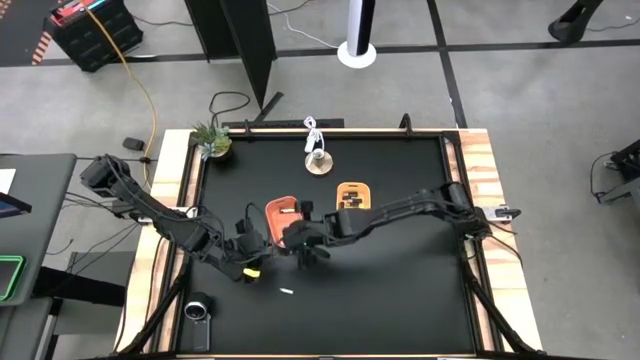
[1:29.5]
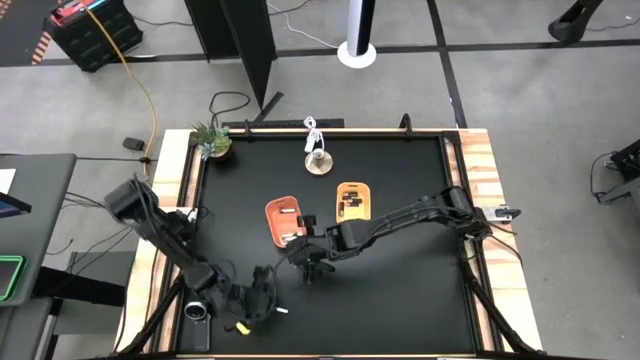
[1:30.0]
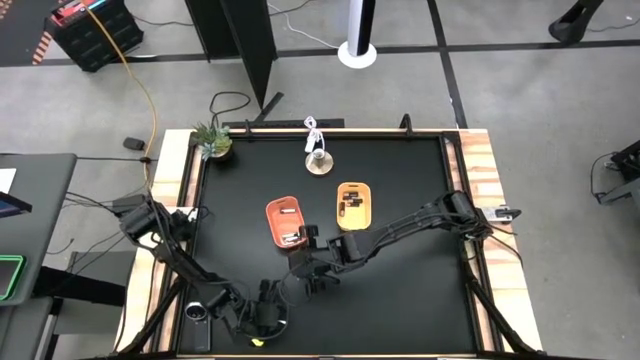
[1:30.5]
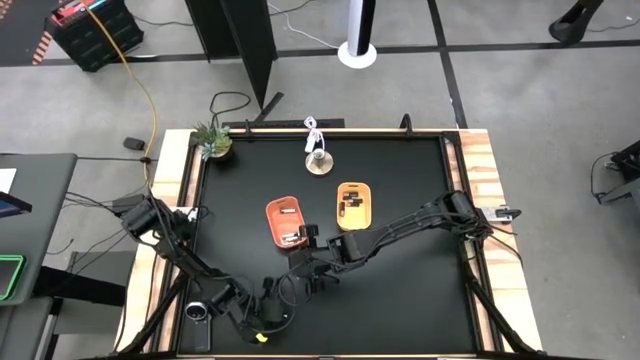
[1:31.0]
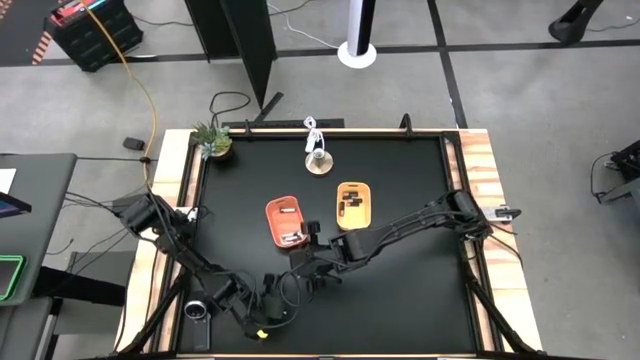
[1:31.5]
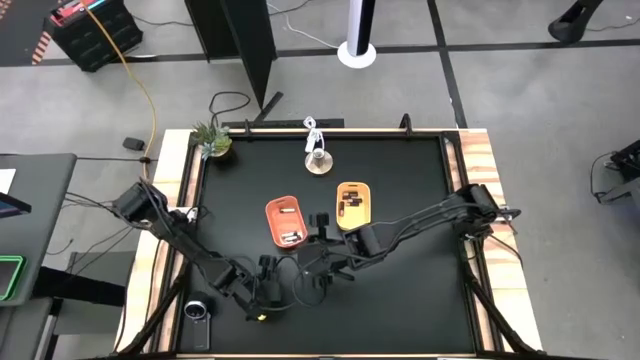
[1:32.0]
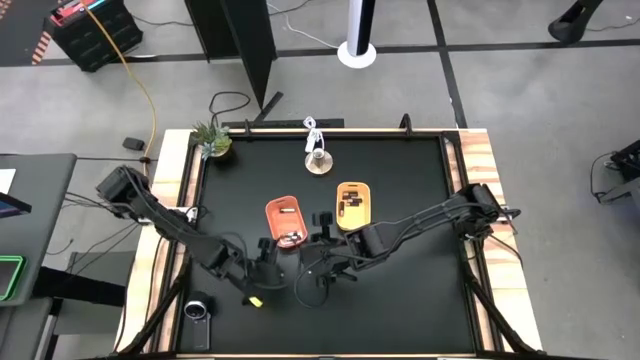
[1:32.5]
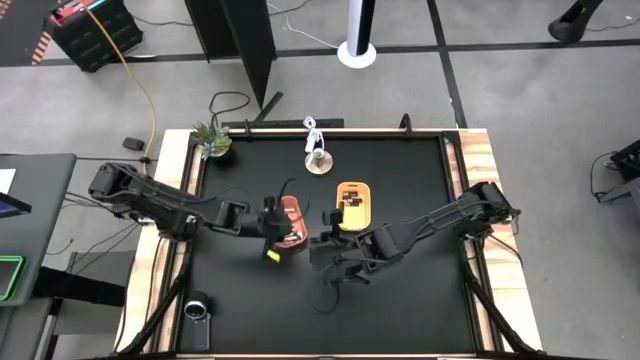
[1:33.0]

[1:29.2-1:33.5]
Task: Sort batteries
Put the silver battery into the orange bin

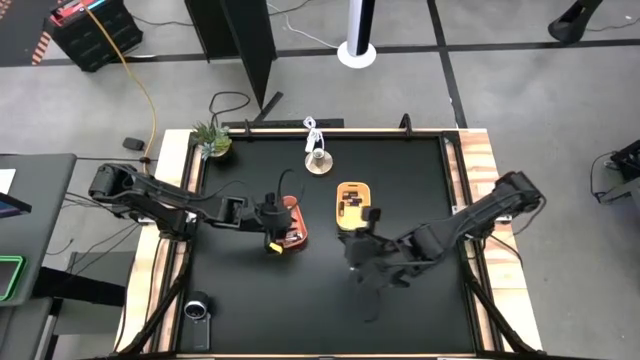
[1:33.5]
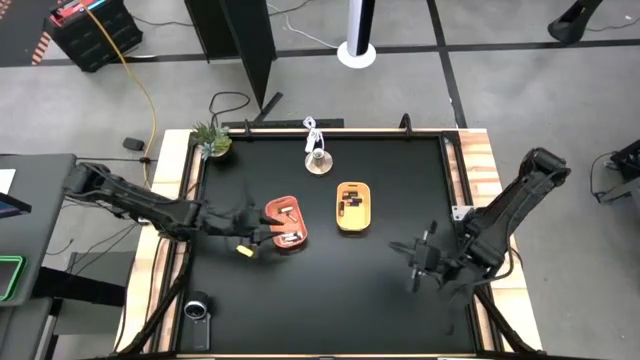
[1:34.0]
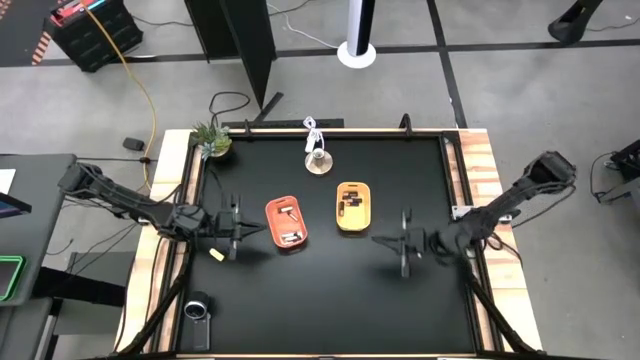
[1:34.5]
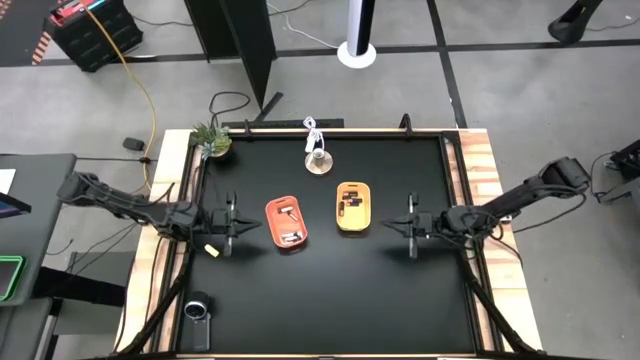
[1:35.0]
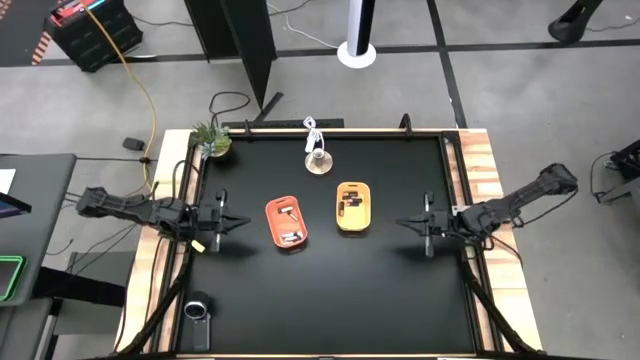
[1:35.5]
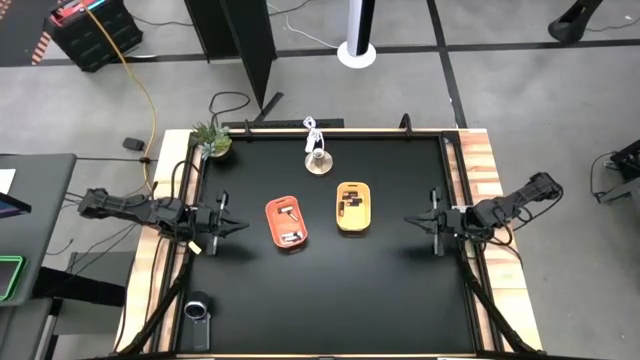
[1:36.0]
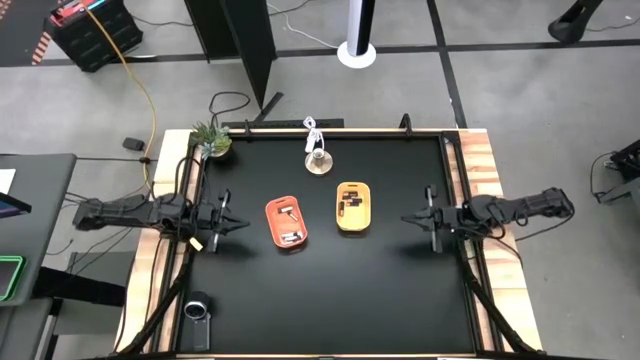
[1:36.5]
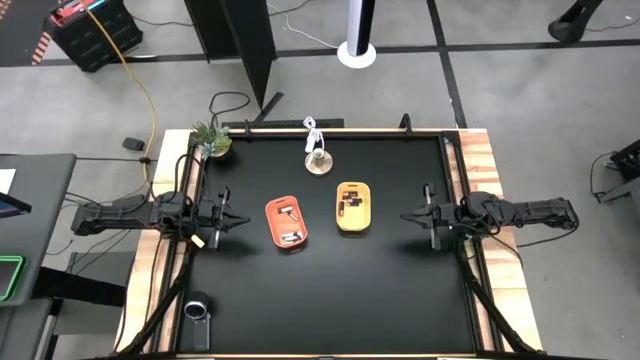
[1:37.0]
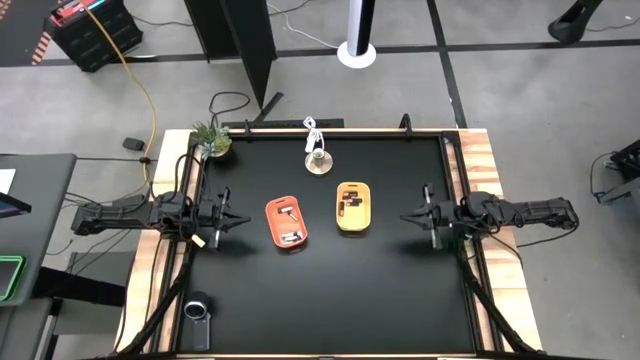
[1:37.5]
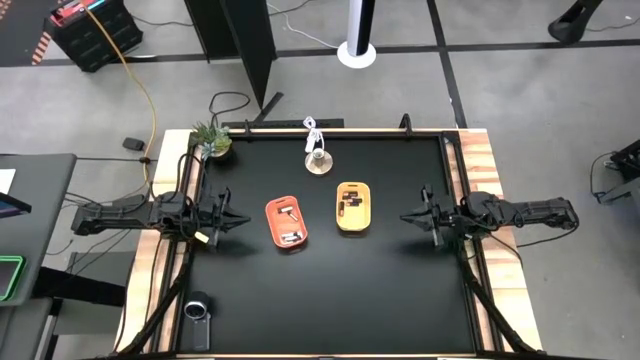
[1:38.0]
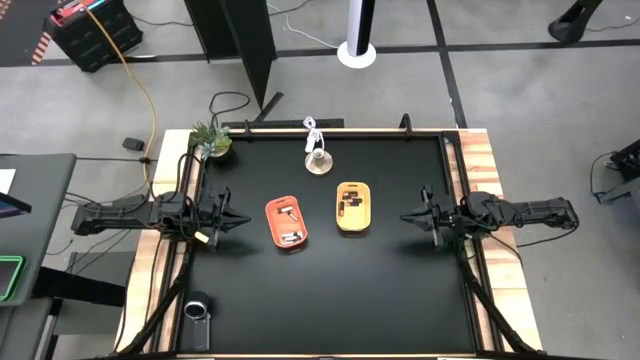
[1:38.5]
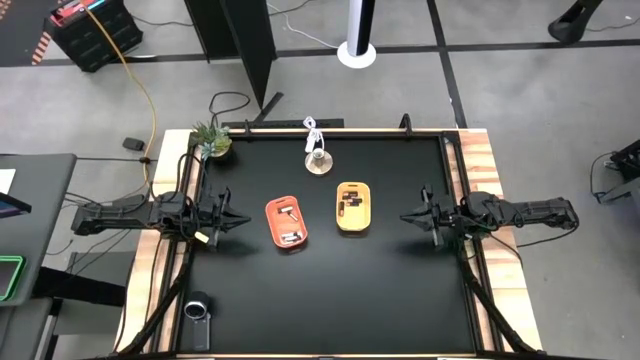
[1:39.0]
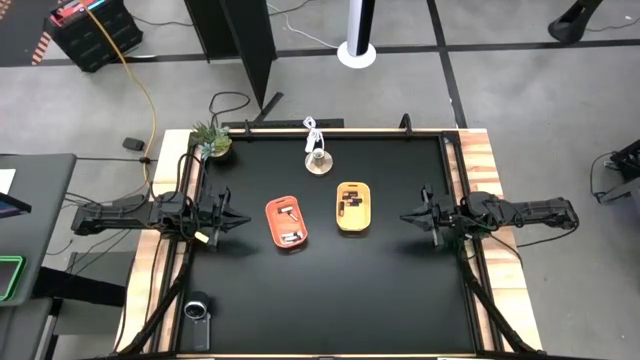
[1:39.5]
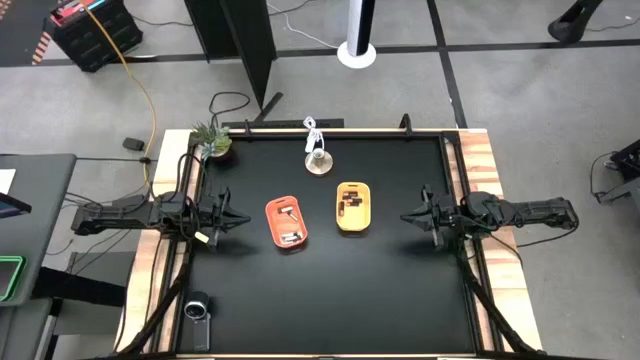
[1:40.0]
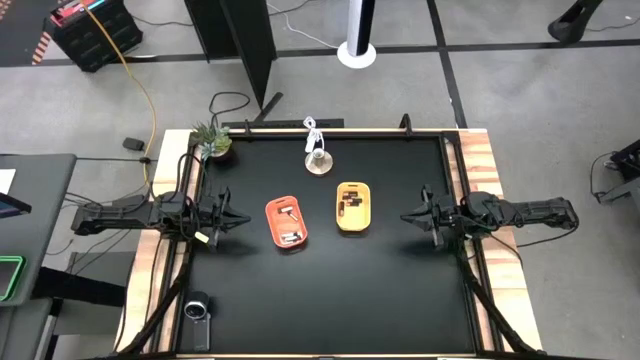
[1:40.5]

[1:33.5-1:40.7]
Return to Home Position

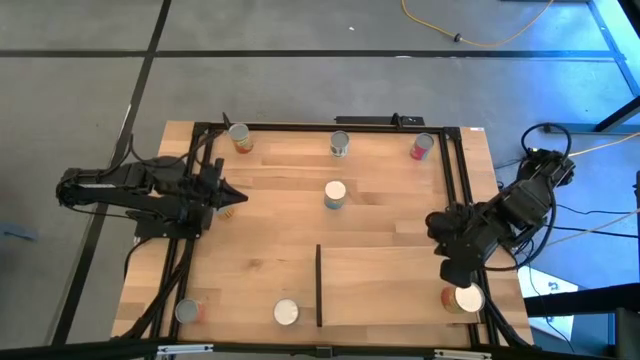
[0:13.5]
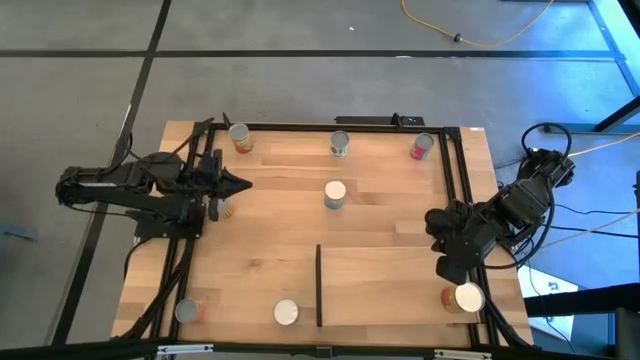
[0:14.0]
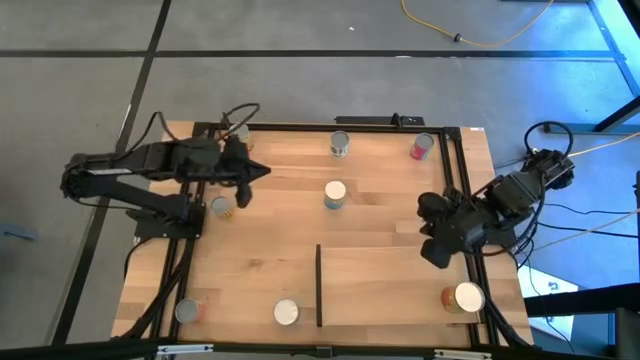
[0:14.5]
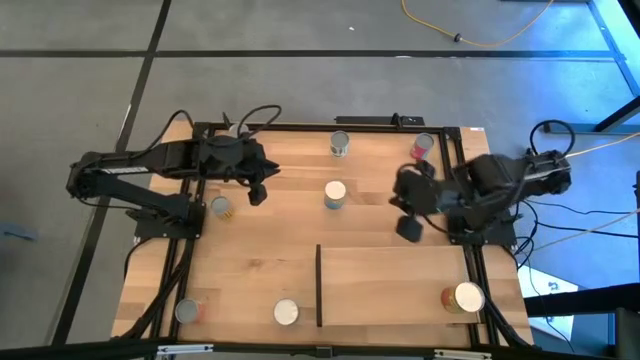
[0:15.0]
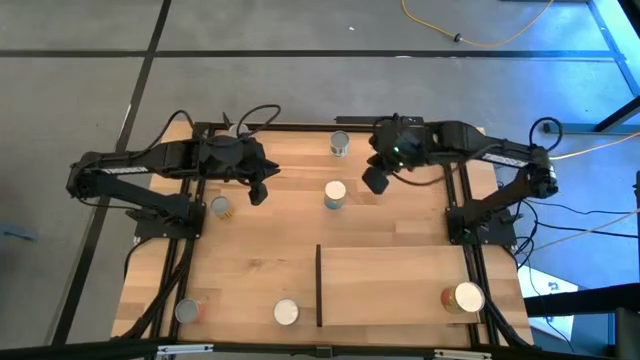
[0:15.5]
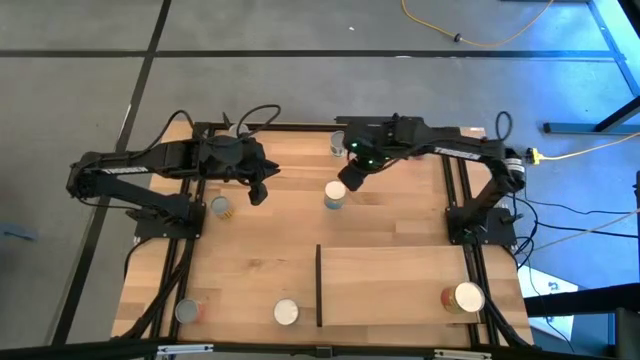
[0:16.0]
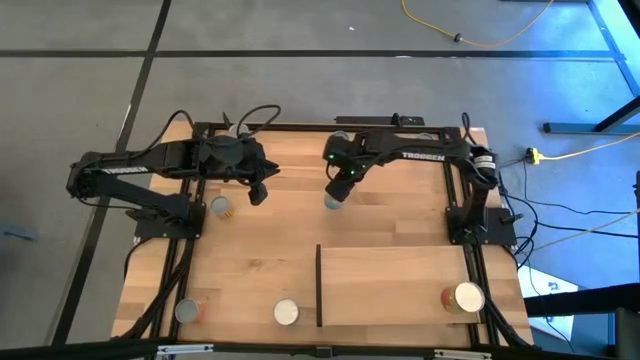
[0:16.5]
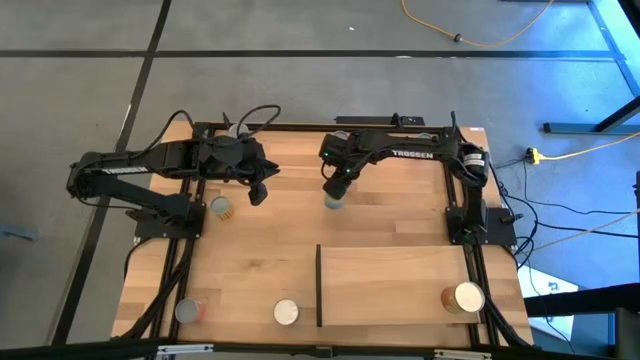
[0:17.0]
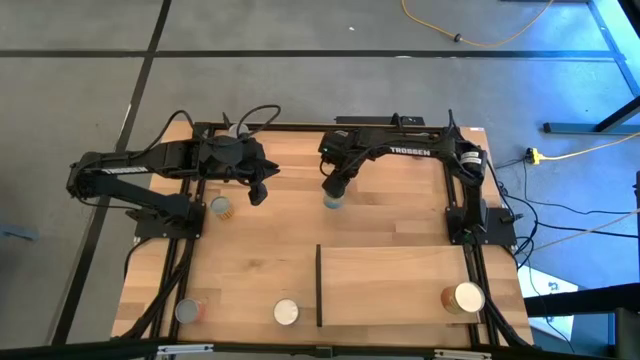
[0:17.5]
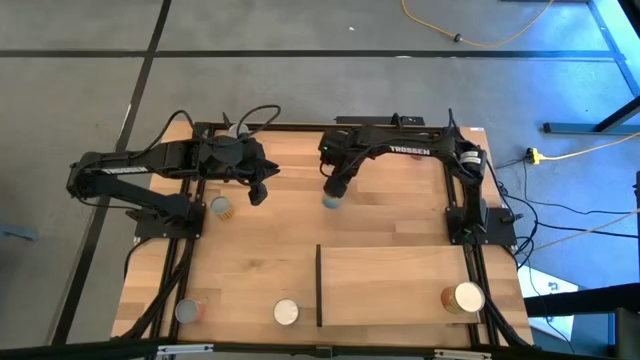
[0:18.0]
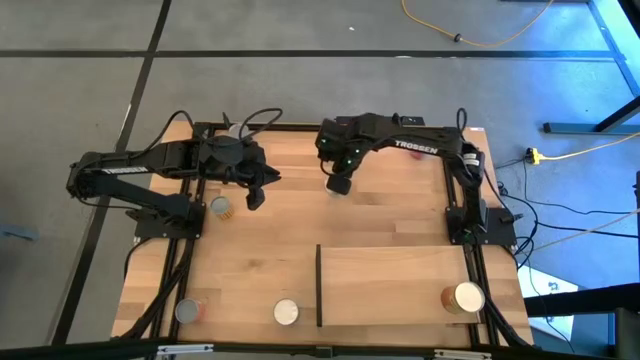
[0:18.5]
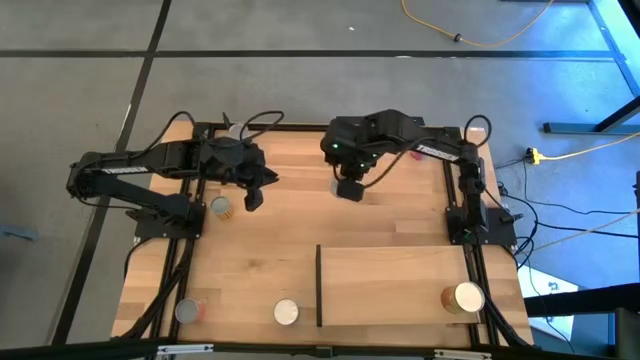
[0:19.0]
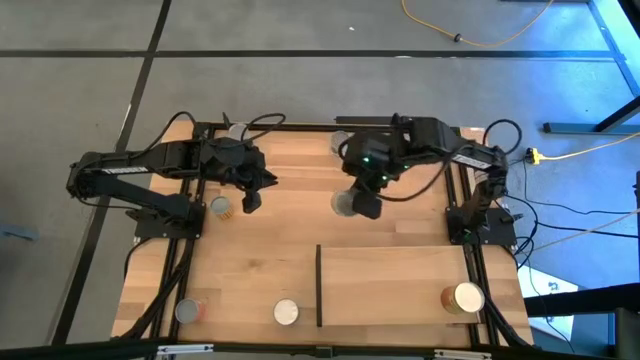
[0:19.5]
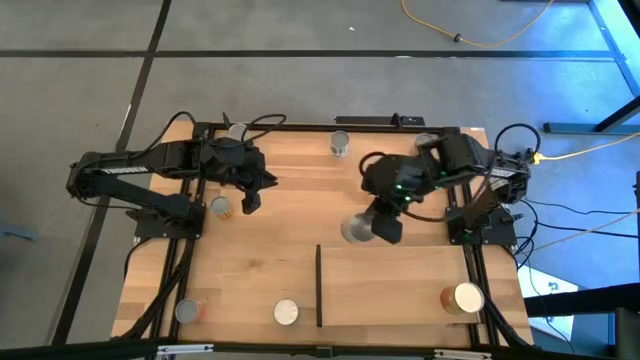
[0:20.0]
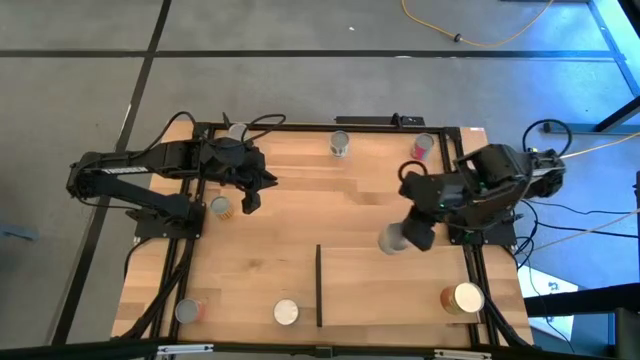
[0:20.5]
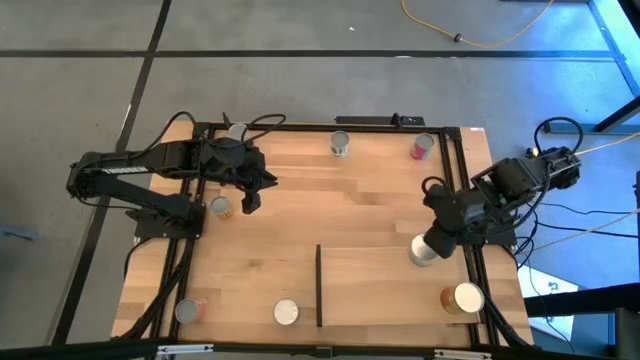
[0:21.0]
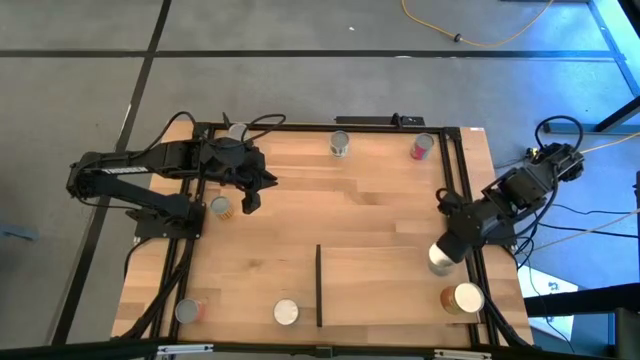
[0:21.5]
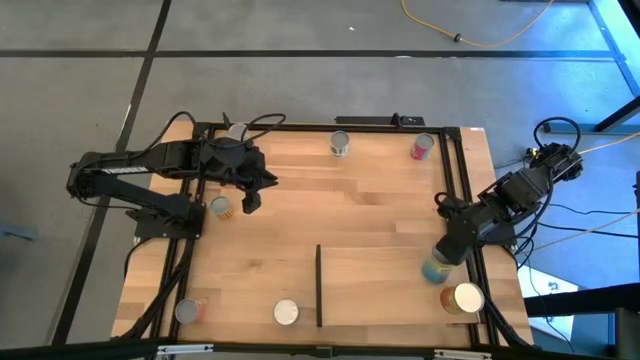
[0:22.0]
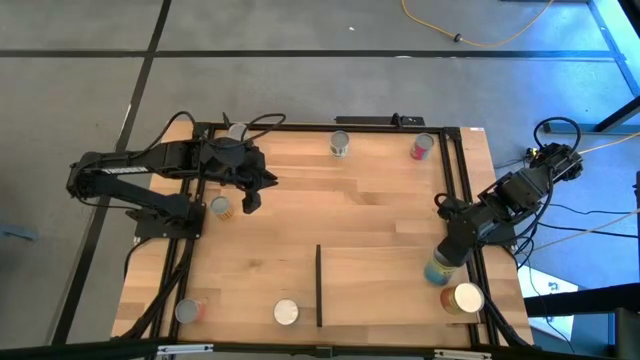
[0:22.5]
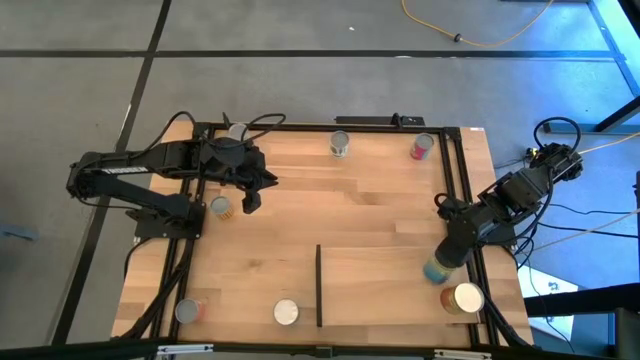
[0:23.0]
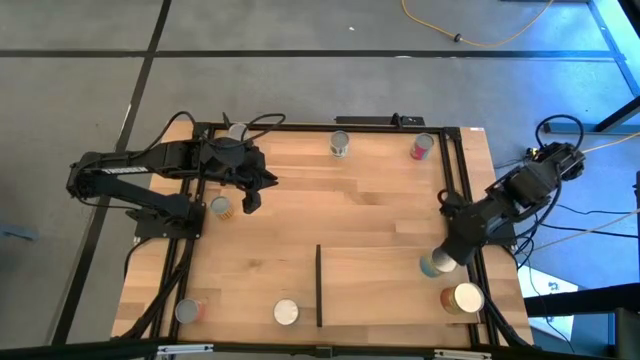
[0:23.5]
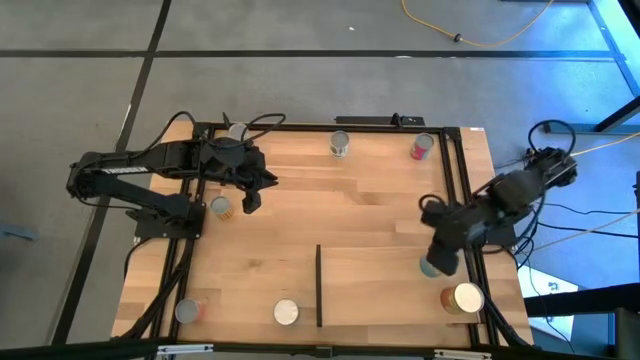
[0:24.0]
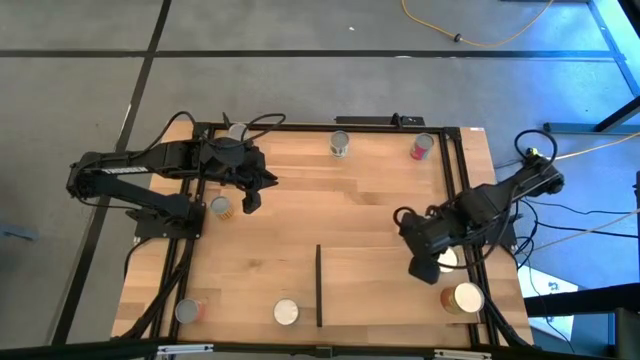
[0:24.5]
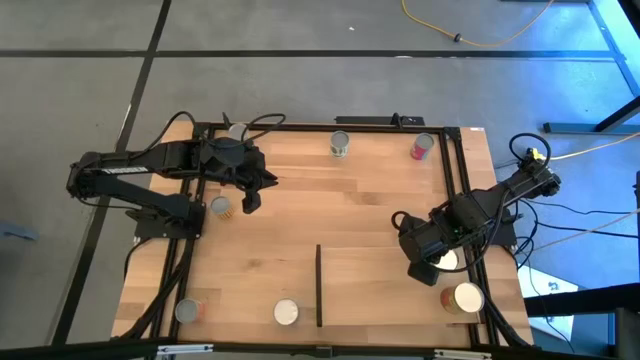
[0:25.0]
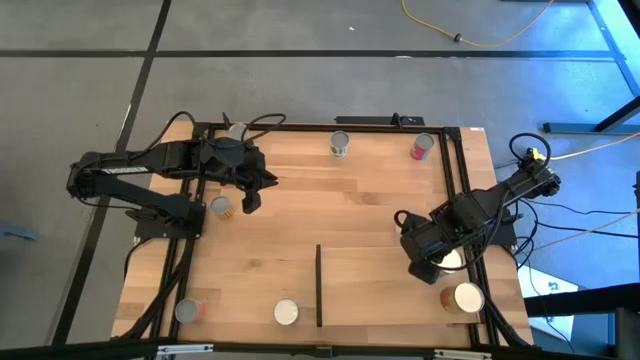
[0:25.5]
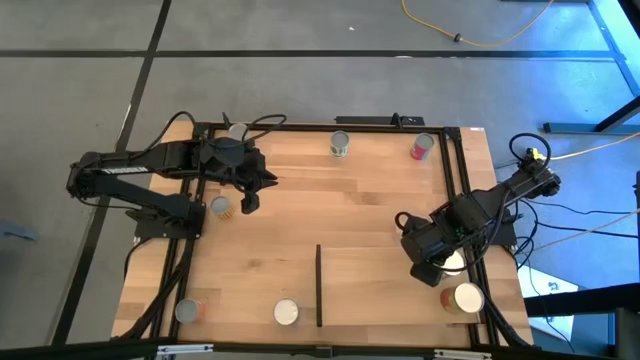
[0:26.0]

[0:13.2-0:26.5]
Task: Pick and place cans onto a shelf
Put the top canned cherries on the shelf
